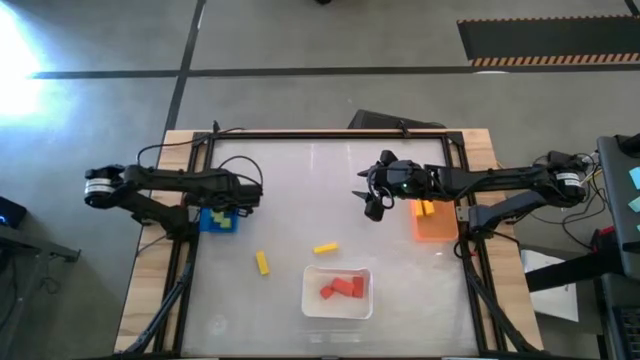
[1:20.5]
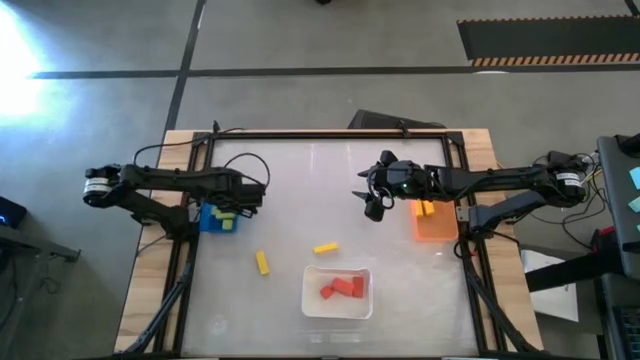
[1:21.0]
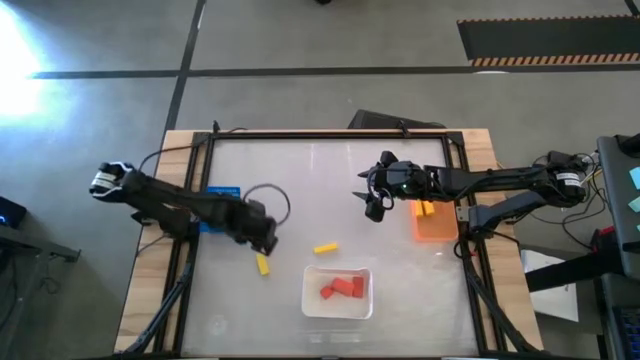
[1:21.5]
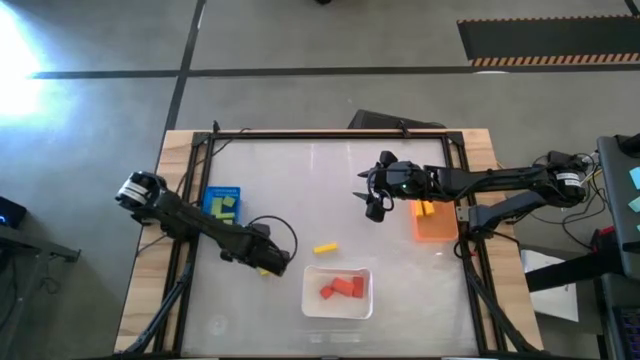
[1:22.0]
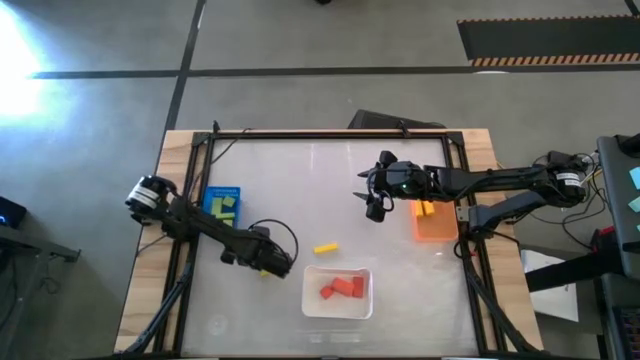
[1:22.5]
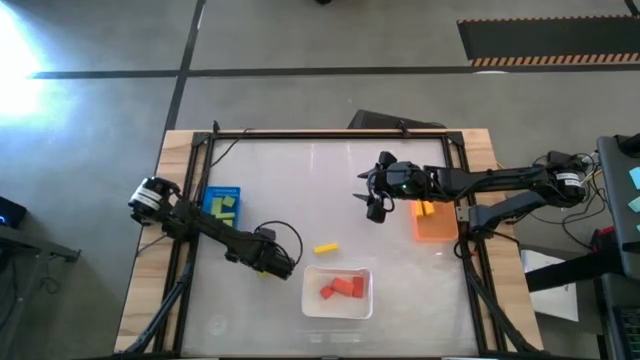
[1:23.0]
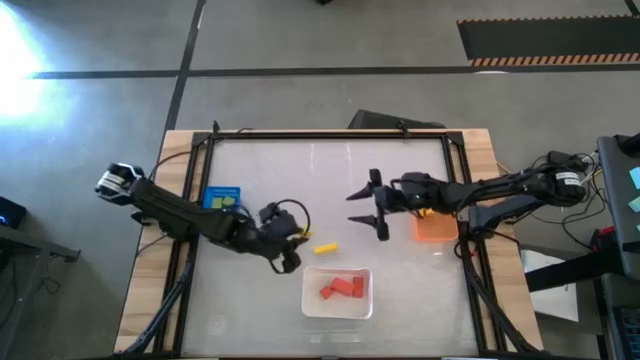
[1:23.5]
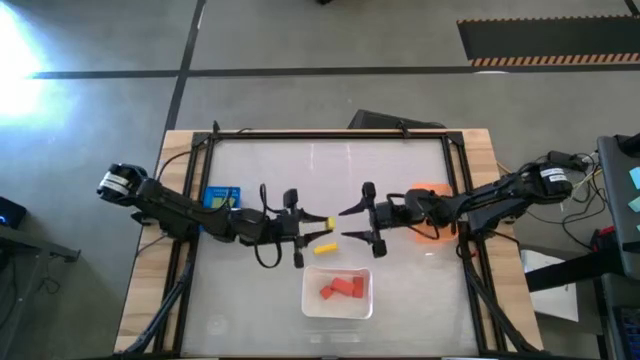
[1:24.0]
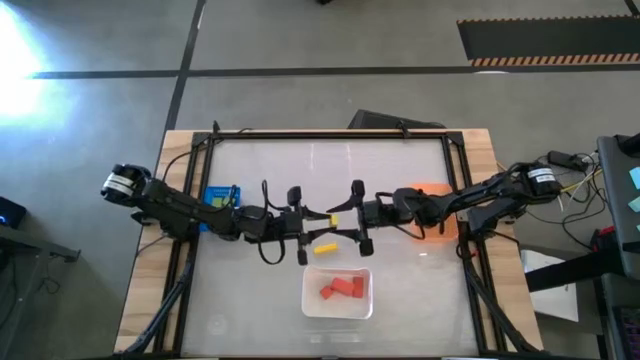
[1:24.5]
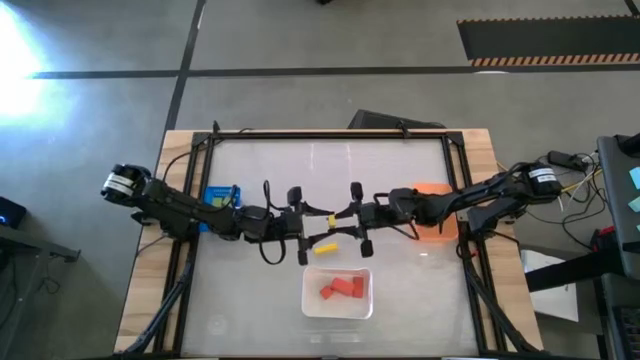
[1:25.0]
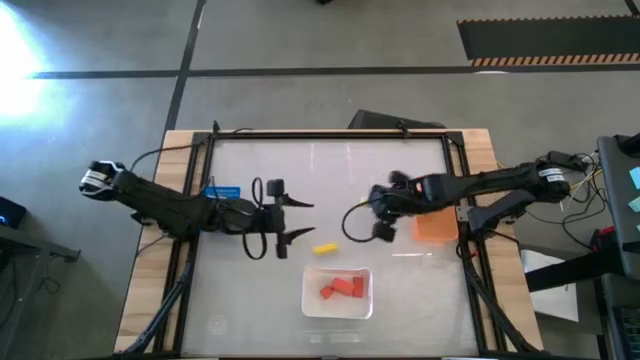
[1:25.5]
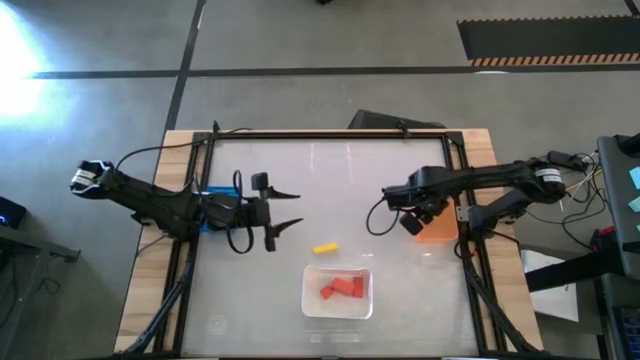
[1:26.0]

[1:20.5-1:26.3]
Task: Sort & place blocks by color
Put the yellow block into the orange bin

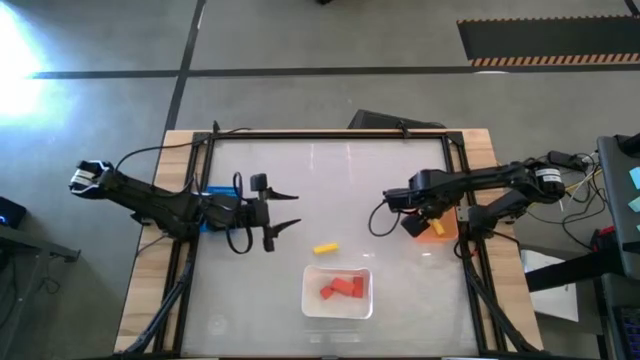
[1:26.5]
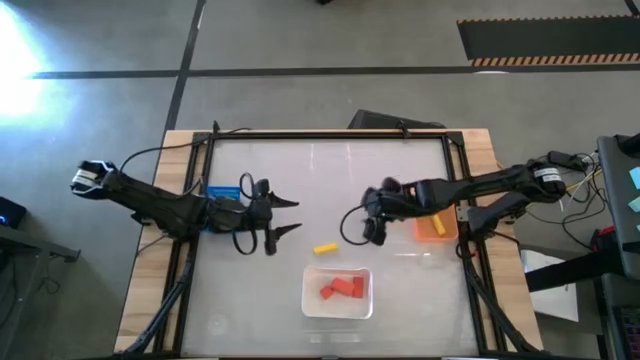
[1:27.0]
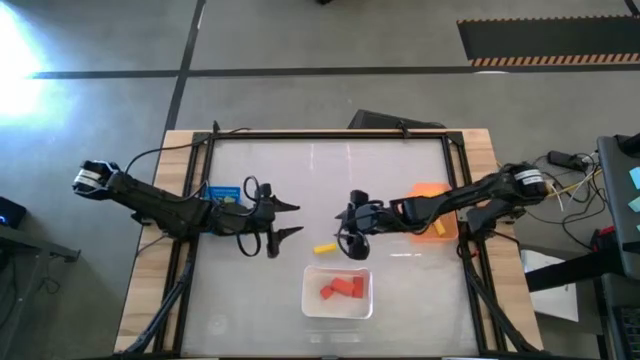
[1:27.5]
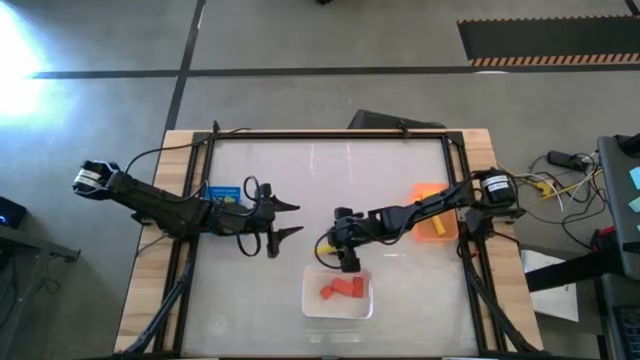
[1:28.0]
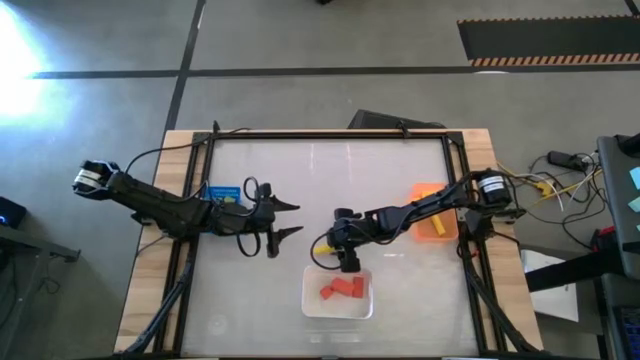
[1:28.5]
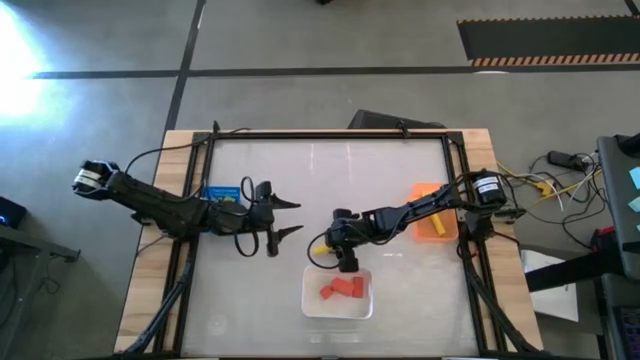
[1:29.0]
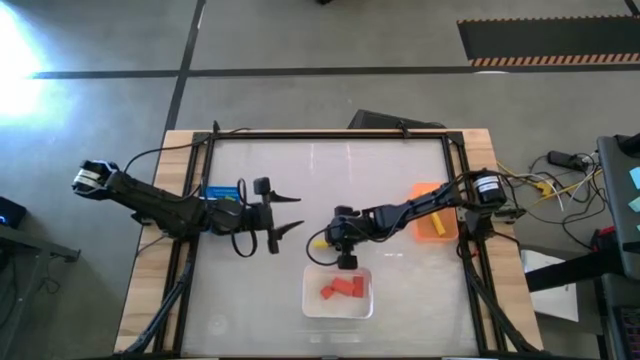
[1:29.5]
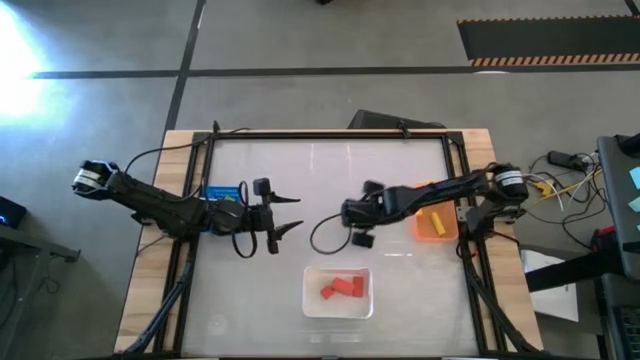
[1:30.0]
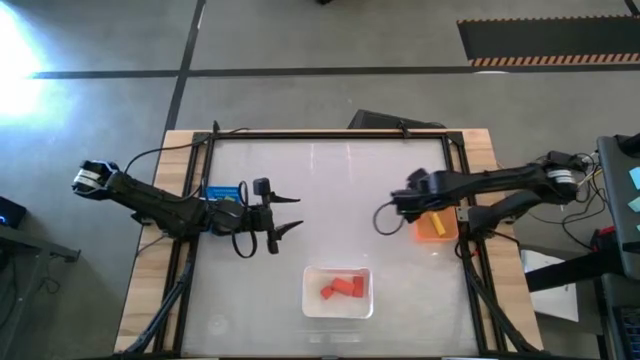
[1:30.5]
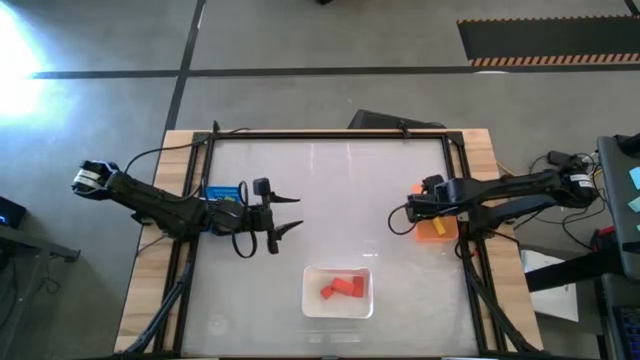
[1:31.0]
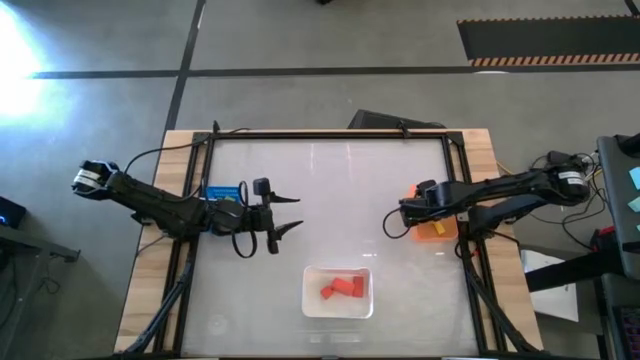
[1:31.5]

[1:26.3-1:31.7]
Put the yellow block into the orange bin

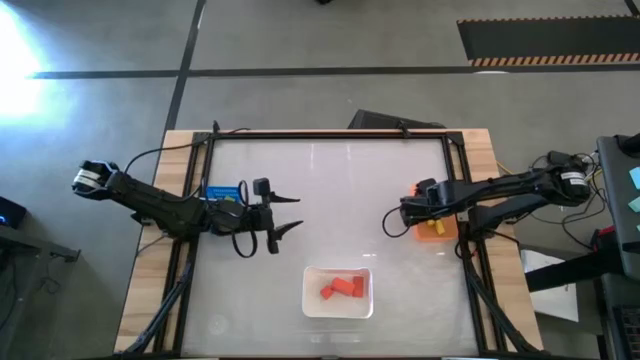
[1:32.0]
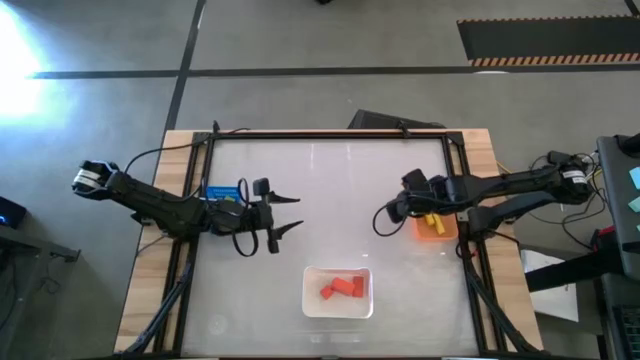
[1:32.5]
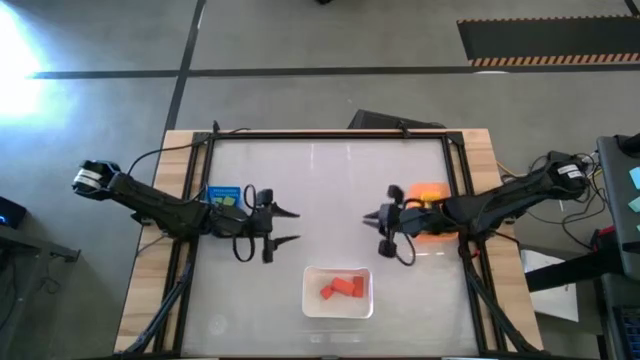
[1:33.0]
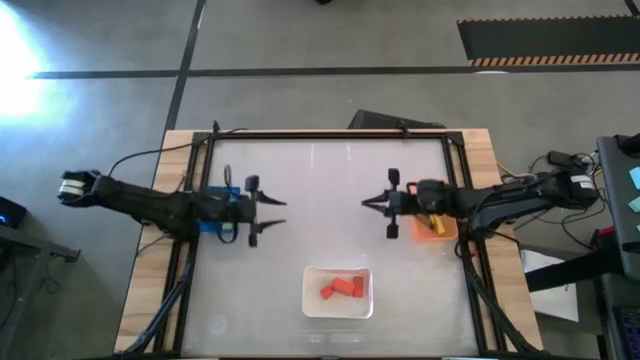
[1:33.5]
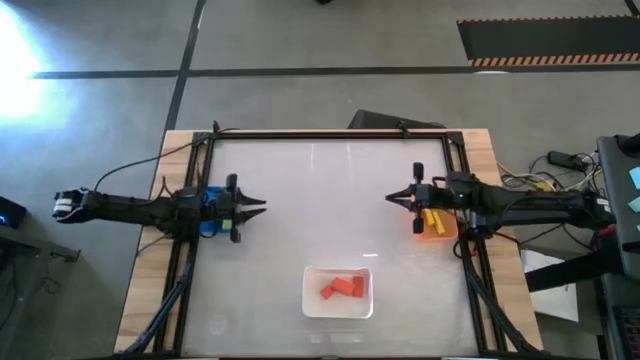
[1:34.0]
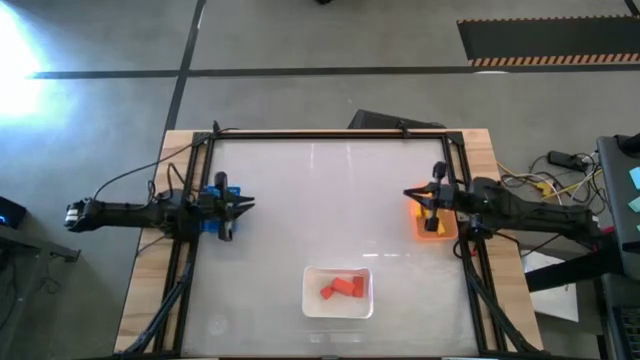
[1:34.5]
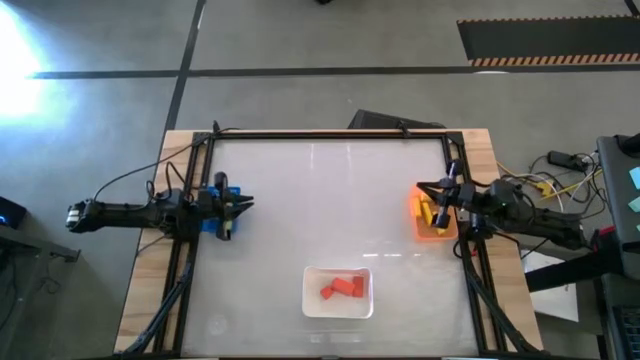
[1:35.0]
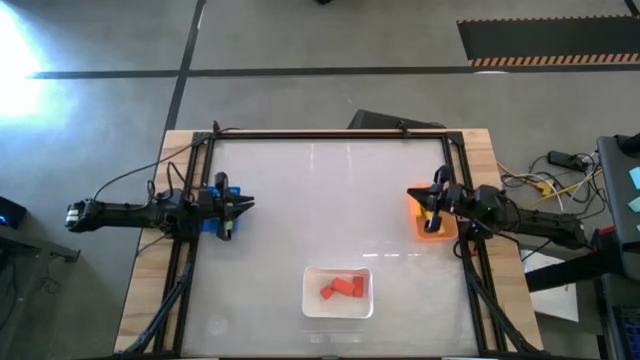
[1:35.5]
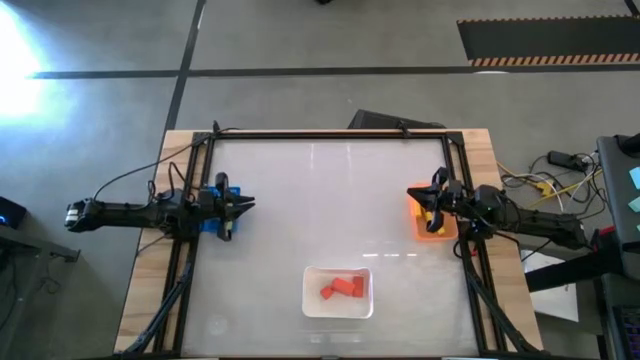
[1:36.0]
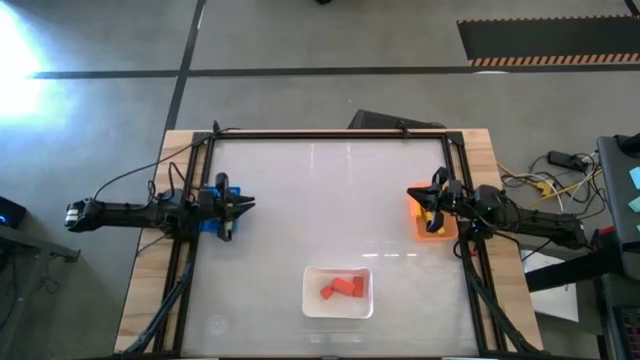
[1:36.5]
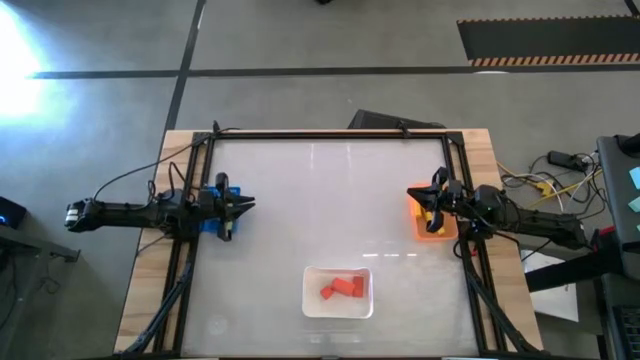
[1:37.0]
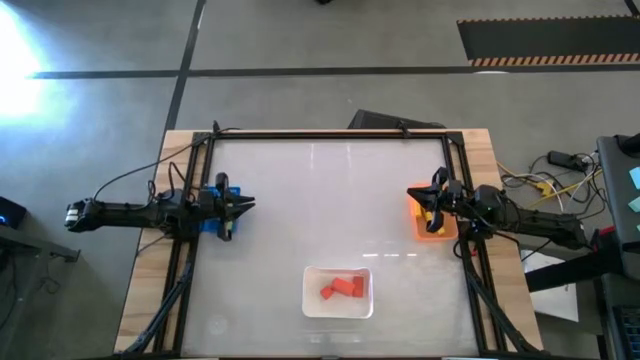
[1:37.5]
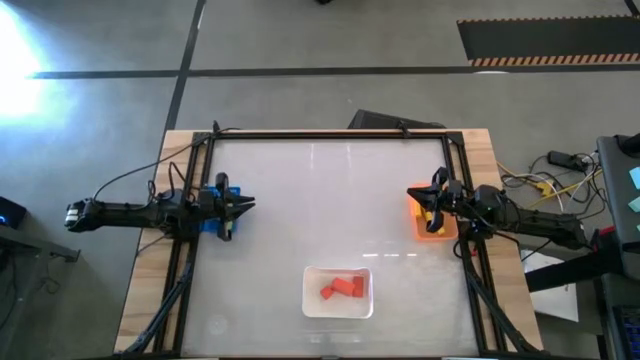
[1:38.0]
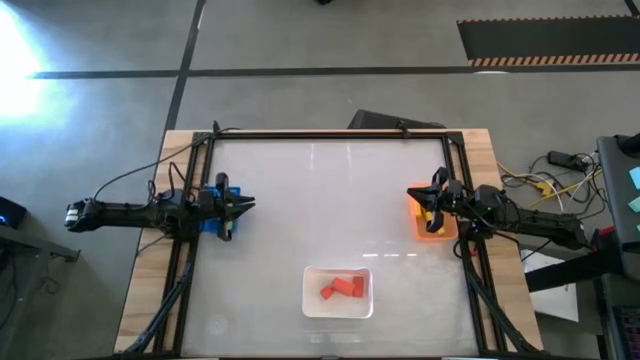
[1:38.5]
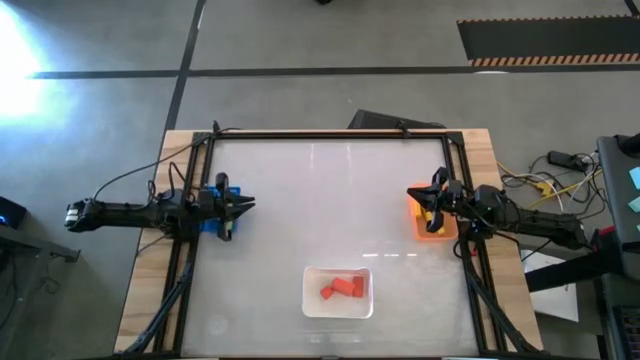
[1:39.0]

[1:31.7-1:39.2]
Return to Home Position
